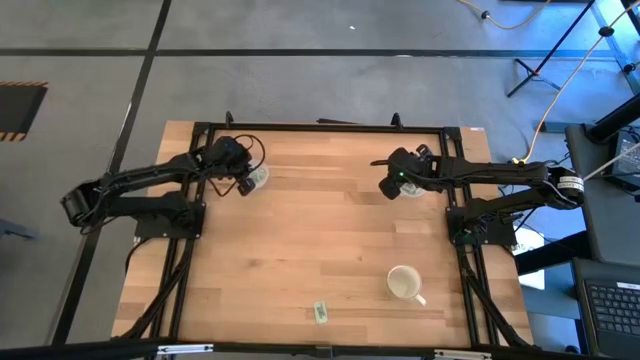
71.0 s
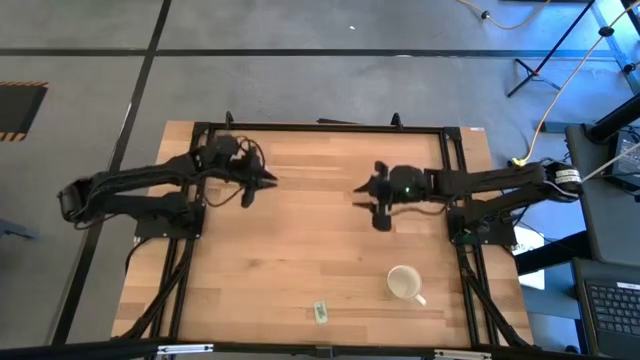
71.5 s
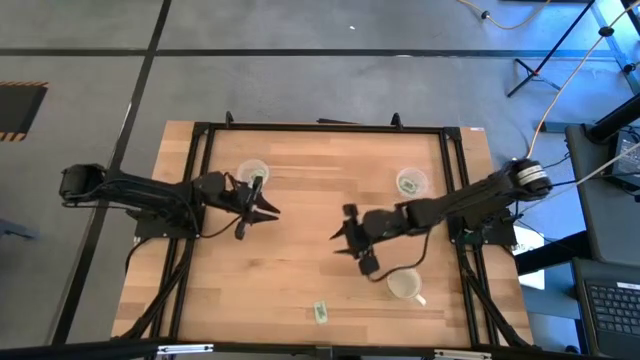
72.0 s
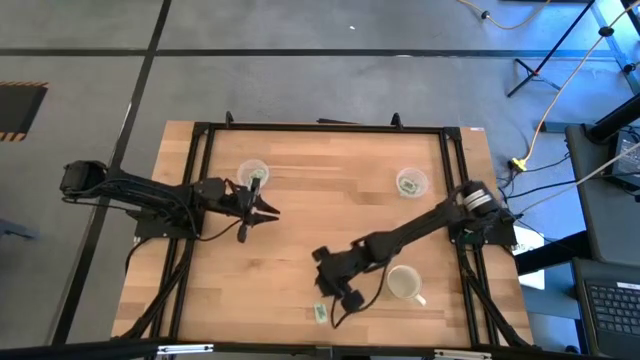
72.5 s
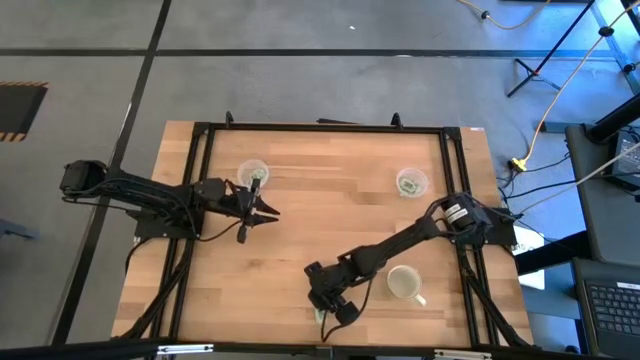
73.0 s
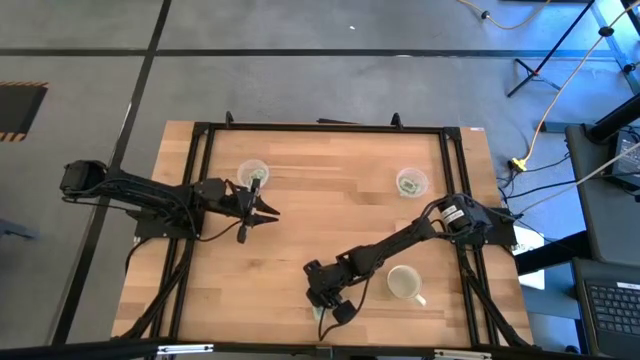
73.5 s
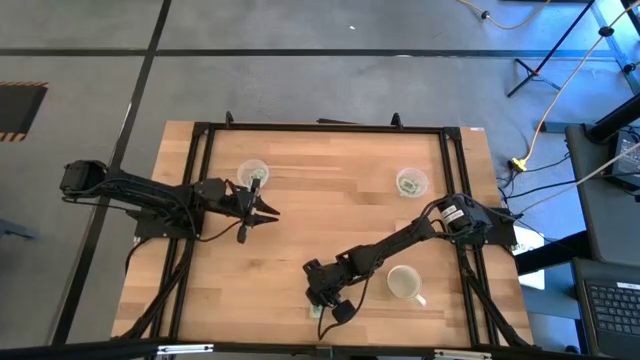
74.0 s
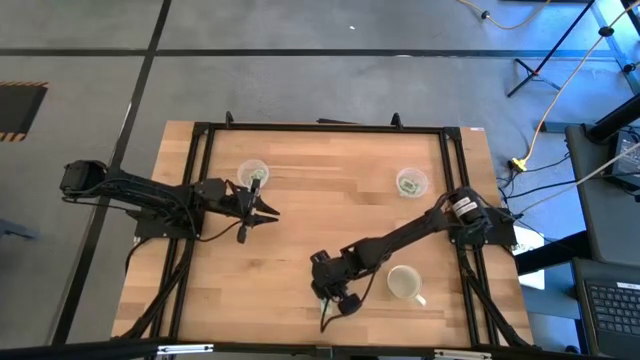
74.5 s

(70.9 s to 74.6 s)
Task: Pick and place Stevia / Truvia into bins
Put the stevia packet into the right transparent container

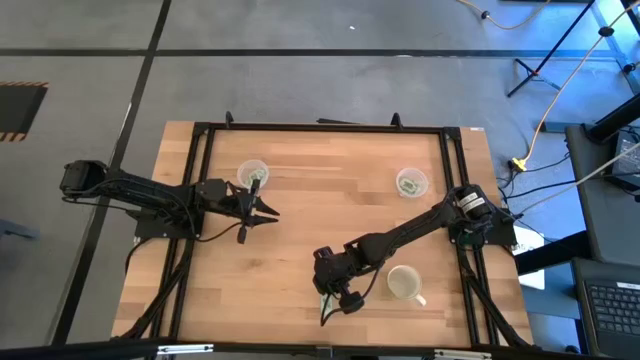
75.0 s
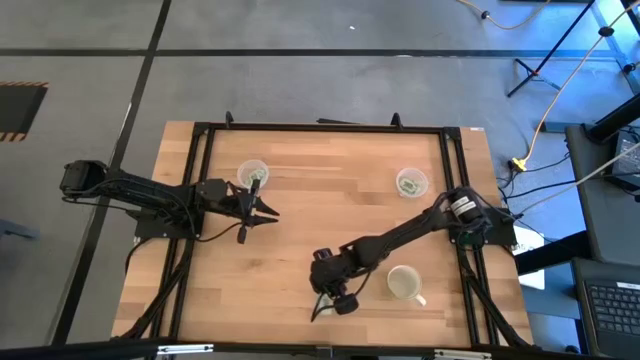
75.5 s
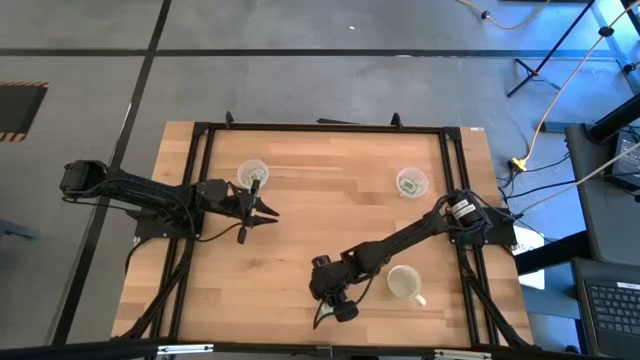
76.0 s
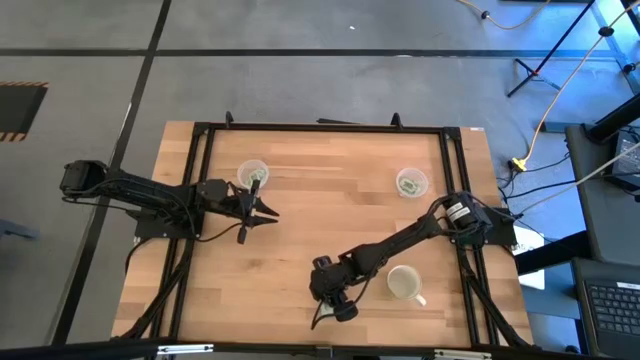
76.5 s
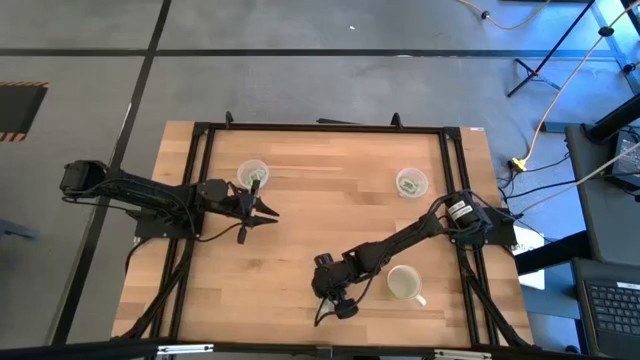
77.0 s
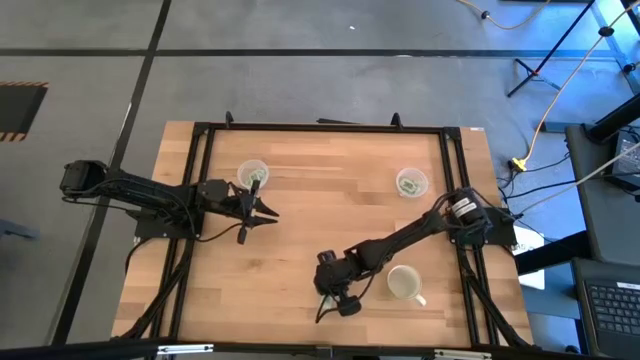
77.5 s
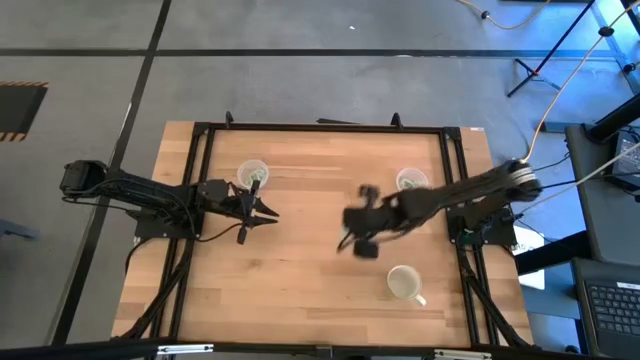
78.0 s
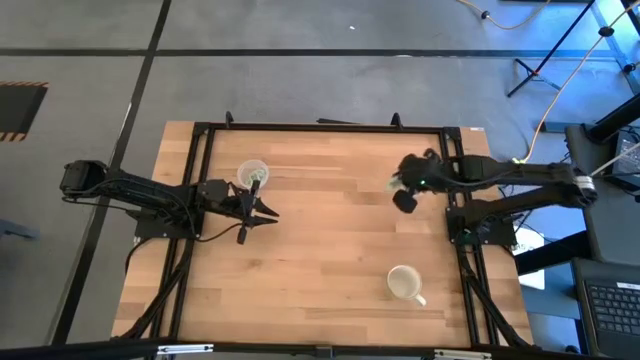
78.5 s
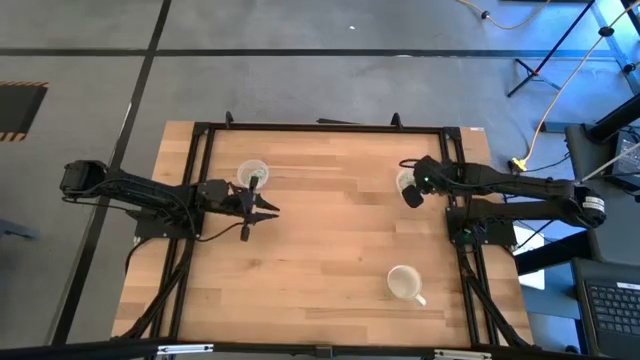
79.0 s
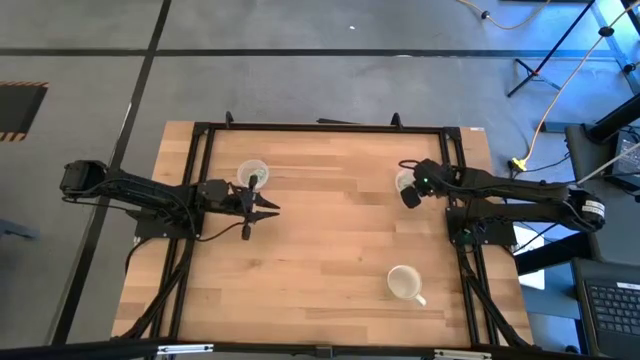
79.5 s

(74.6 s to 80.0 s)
Put the stevia packet into the right transparent container

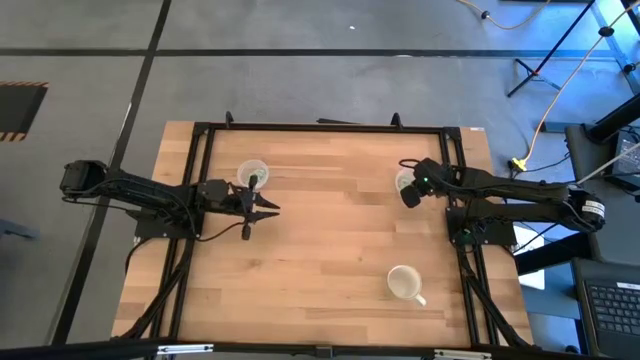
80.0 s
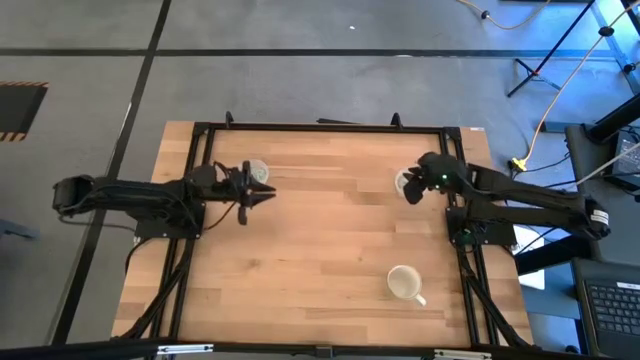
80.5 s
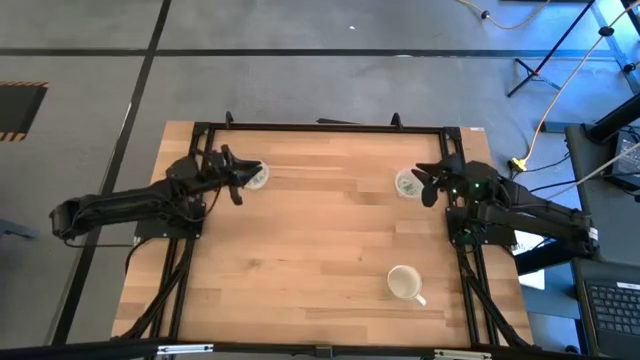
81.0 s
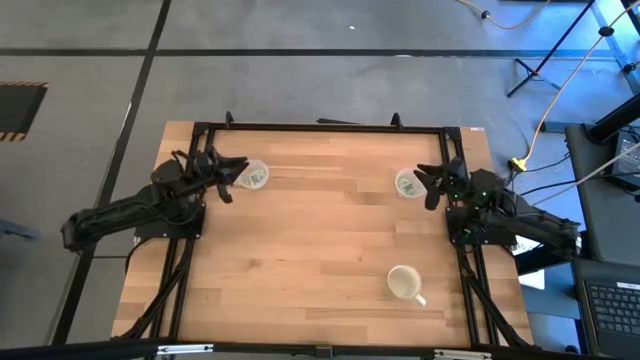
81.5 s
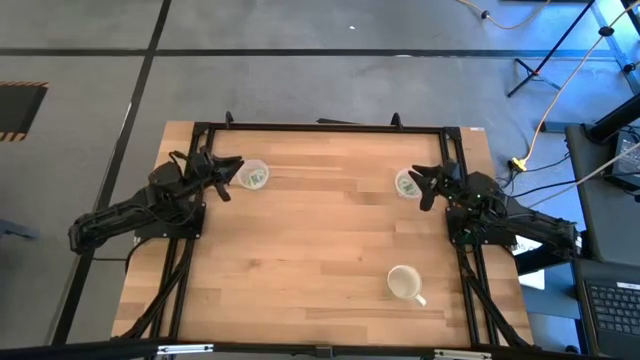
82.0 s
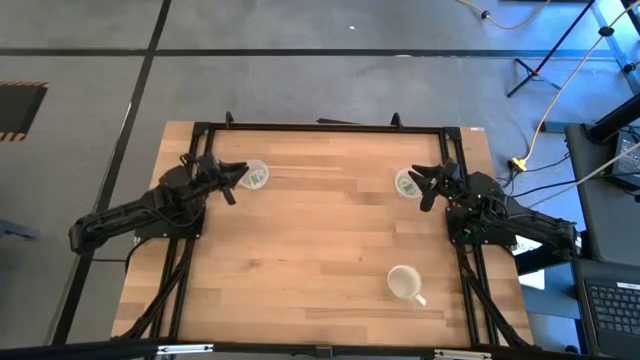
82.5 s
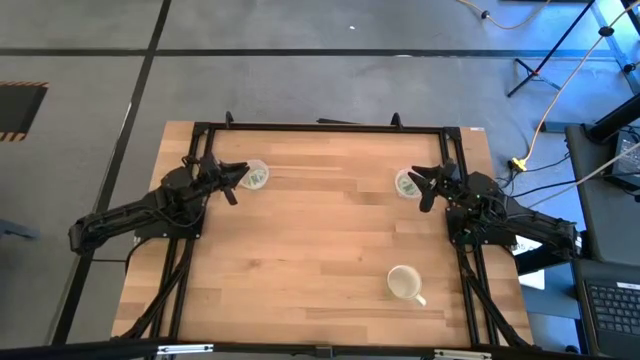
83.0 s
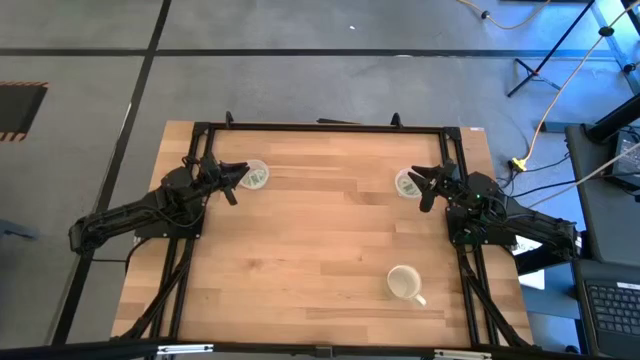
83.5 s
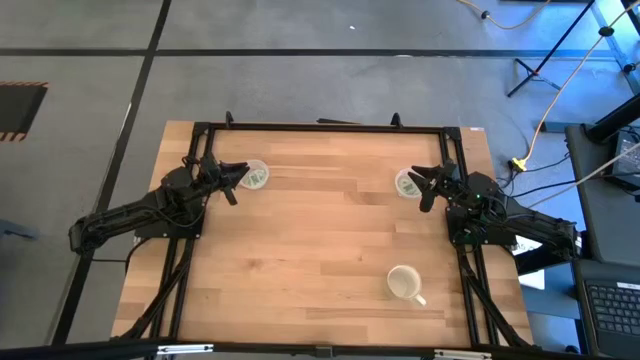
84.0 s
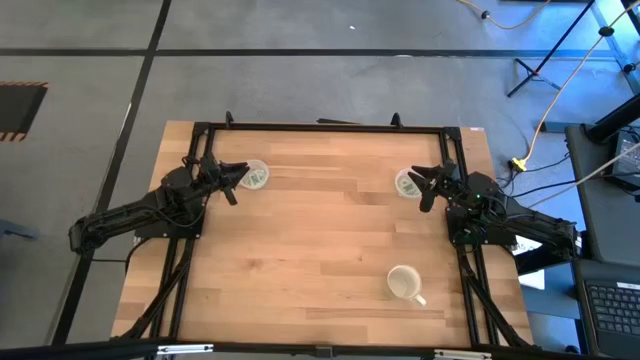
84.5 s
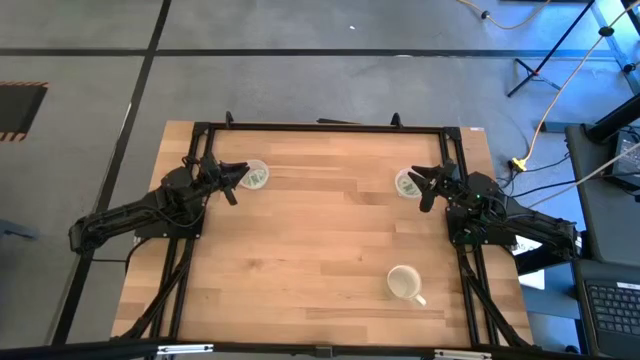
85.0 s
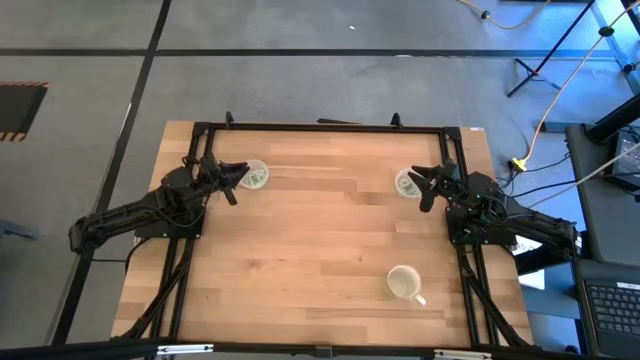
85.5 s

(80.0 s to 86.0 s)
Return to Home Position

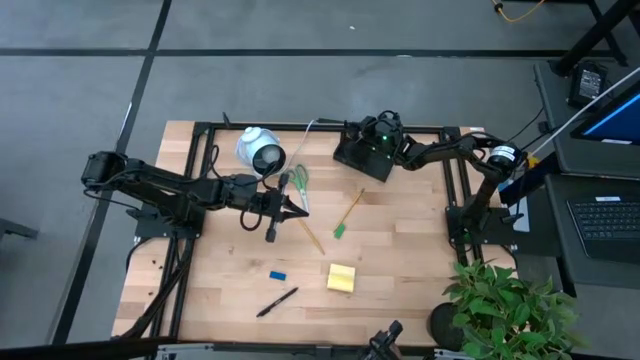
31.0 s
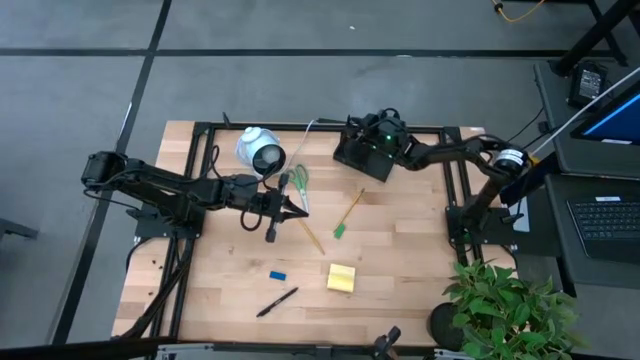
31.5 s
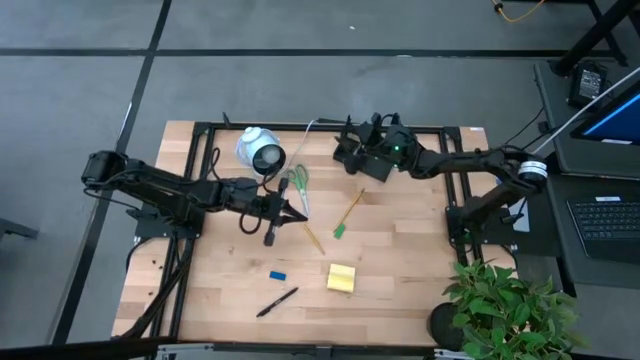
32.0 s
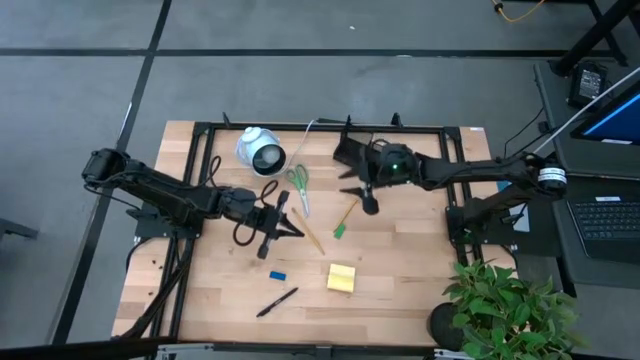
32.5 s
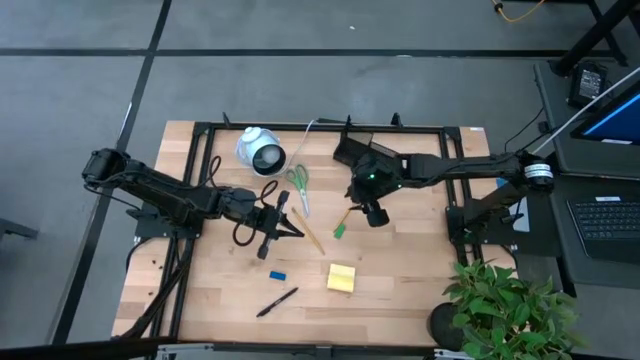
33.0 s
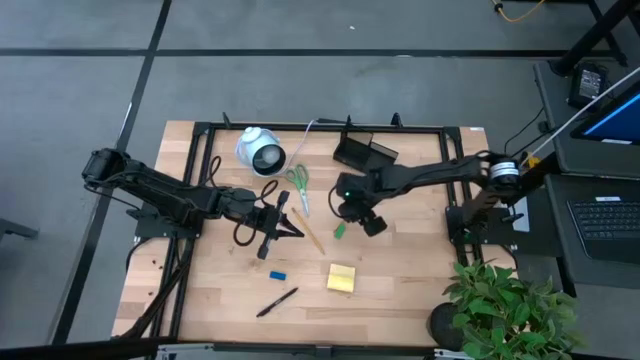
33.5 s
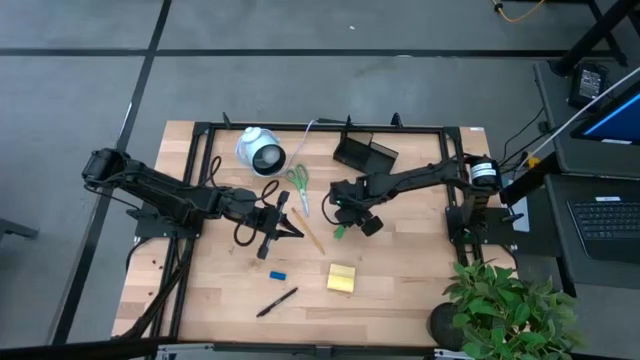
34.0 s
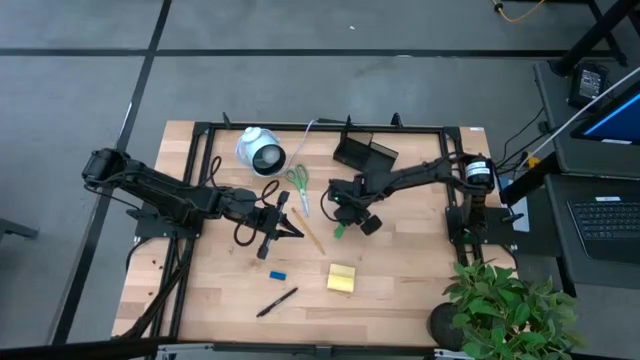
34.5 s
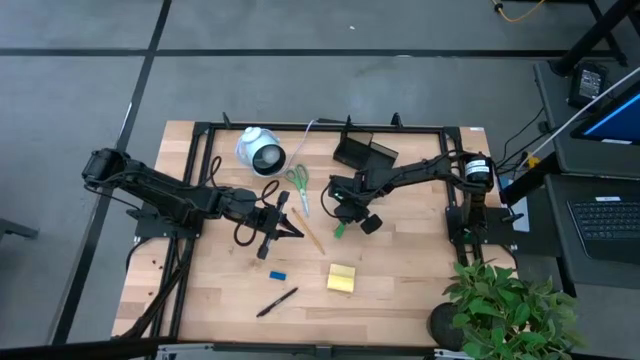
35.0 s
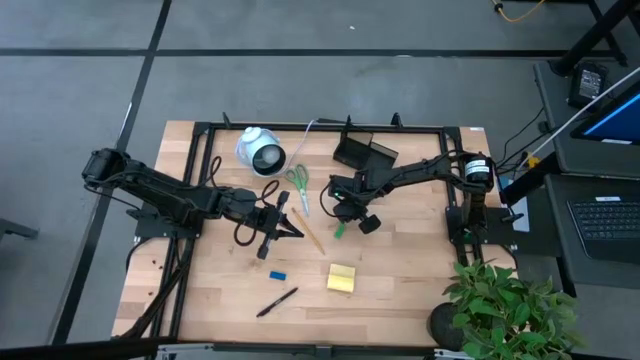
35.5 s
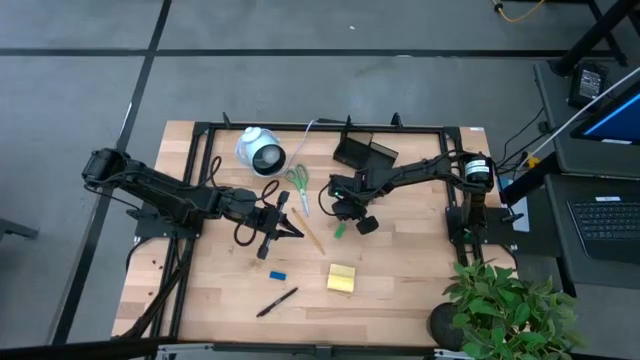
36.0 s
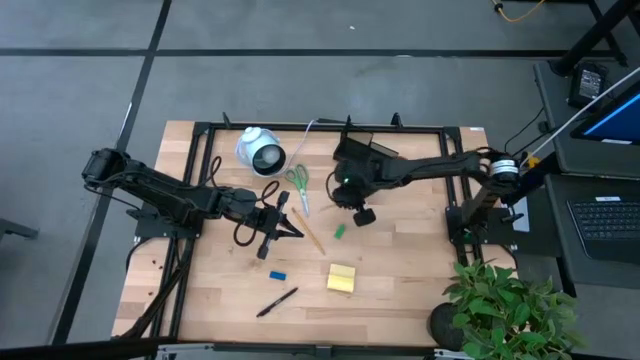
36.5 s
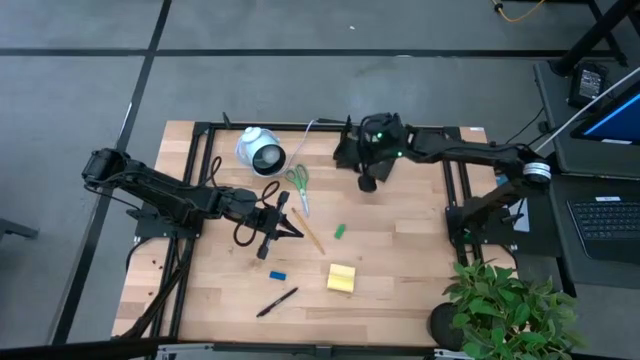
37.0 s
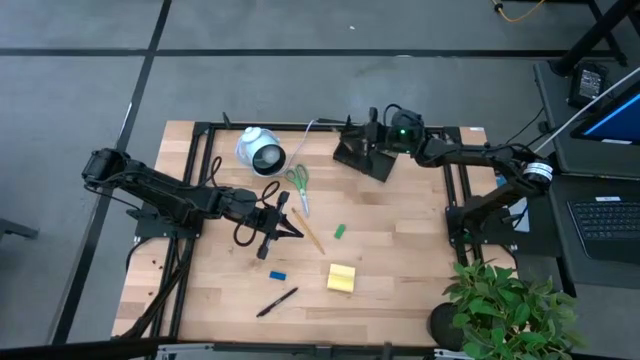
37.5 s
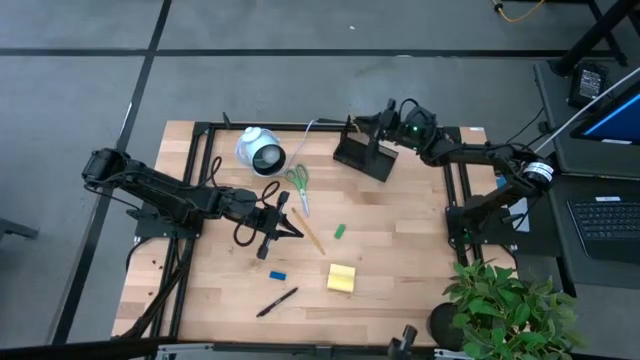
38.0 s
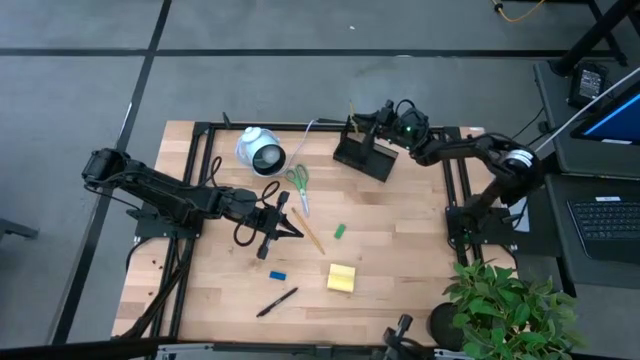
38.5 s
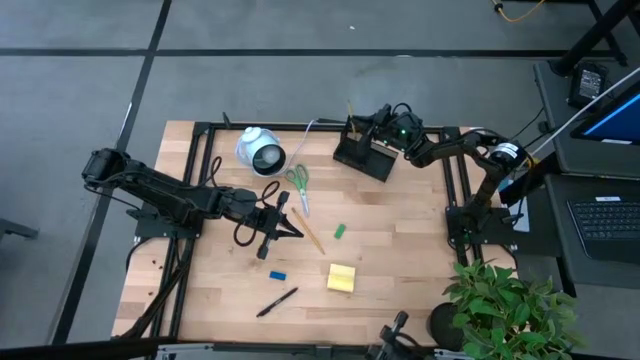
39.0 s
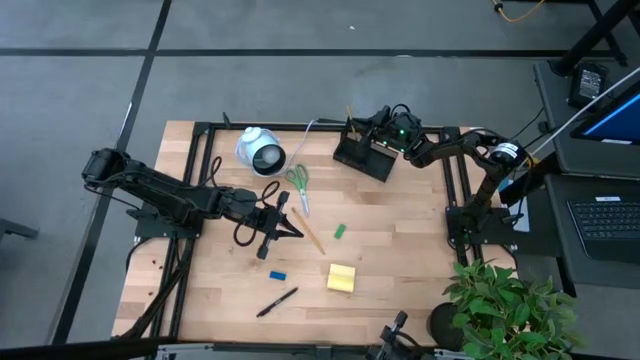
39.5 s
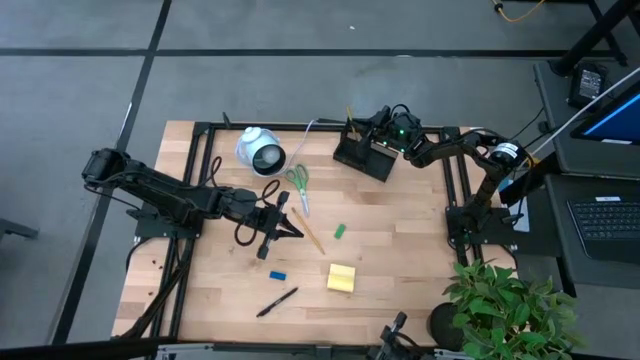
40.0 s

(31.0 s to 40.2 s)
Task: Pick and place office supplies into organizer
Put the top yellow pencil into the desk organizer
